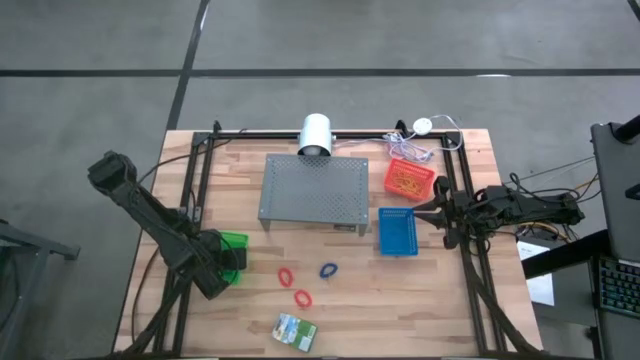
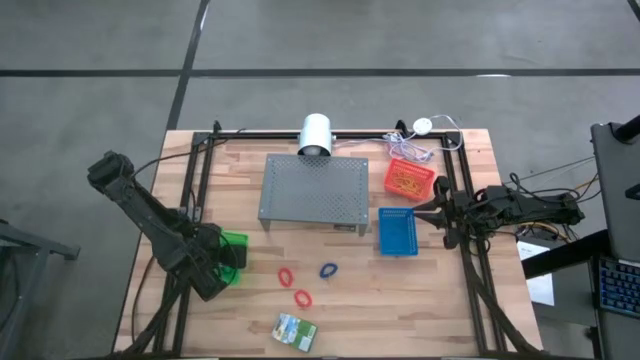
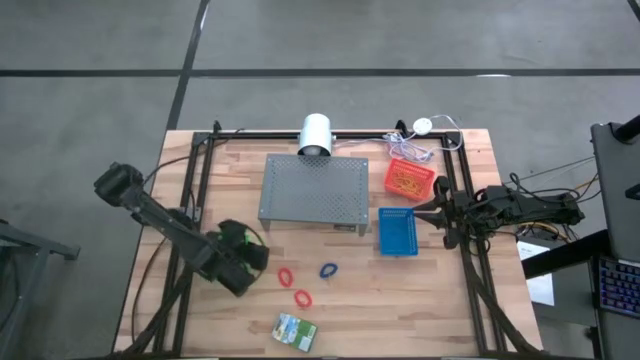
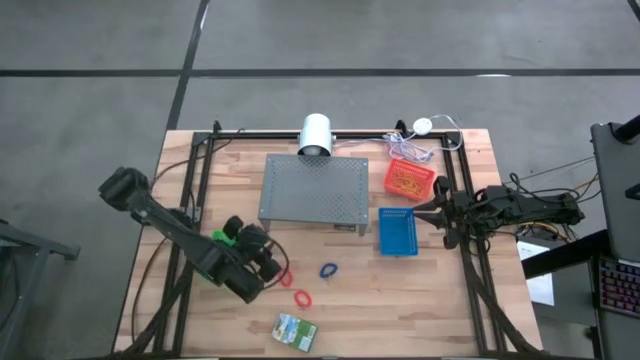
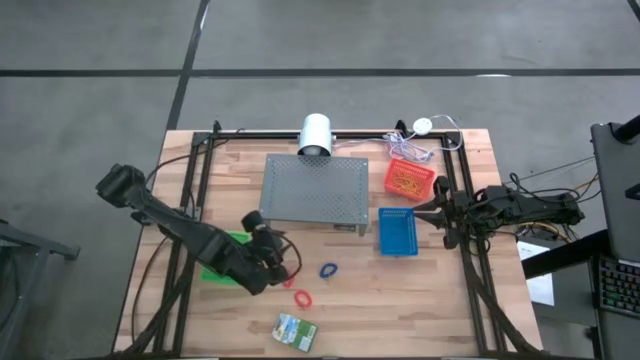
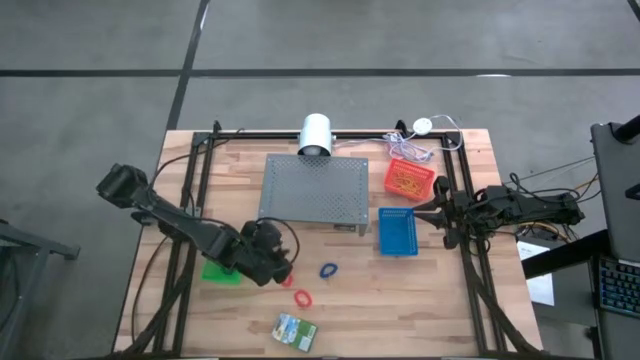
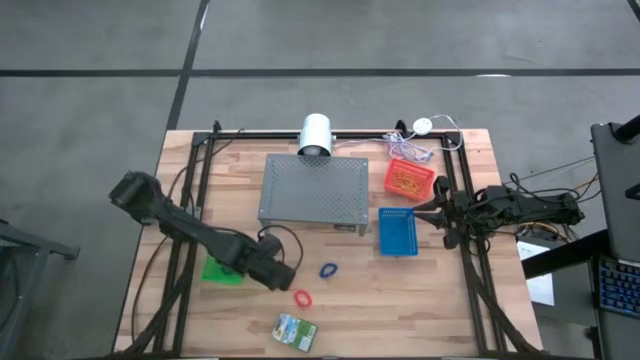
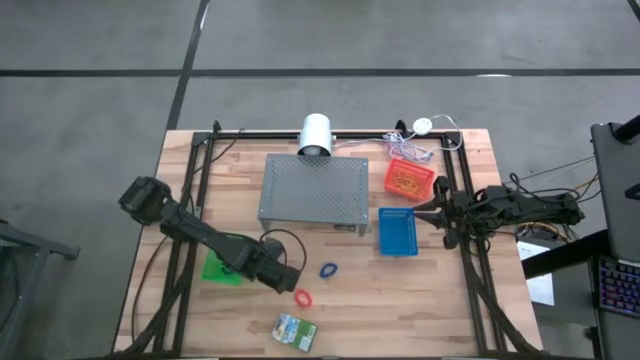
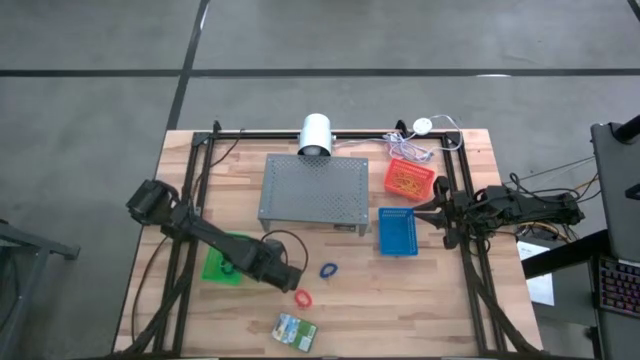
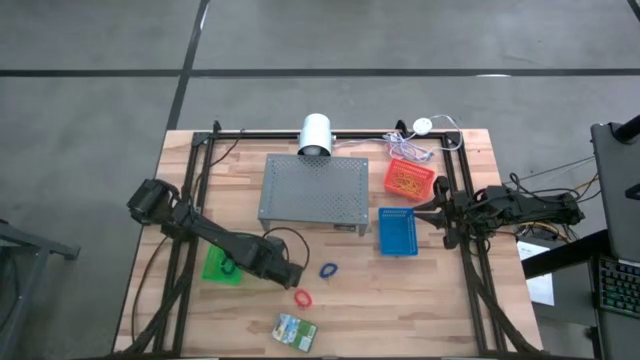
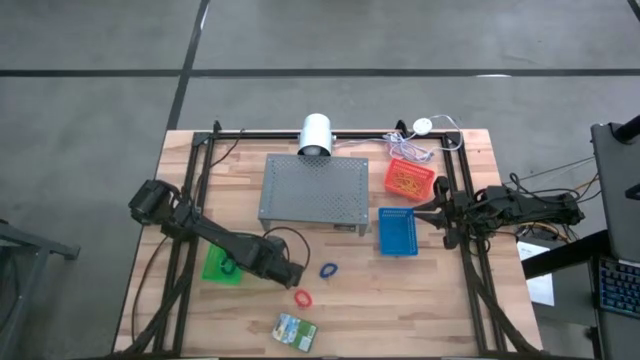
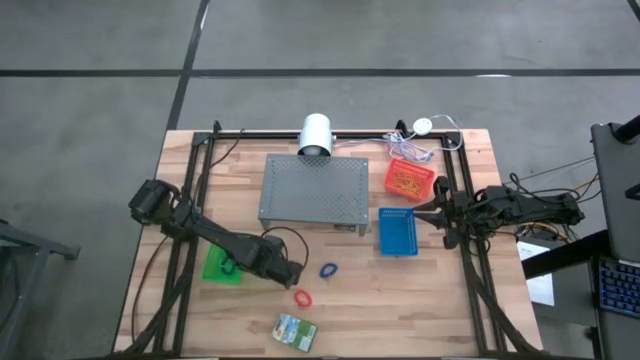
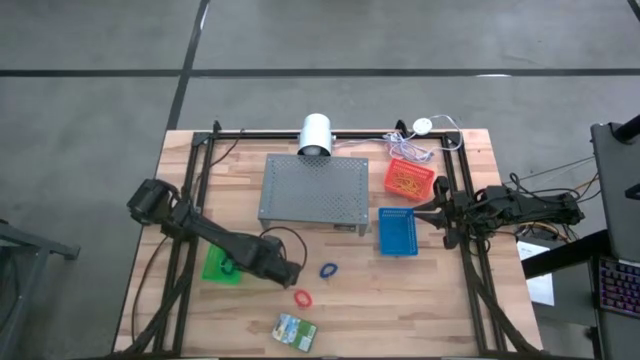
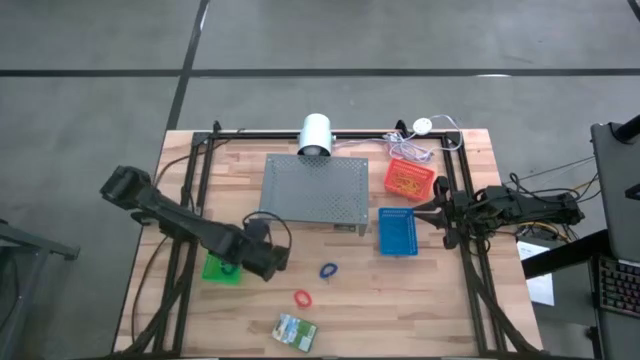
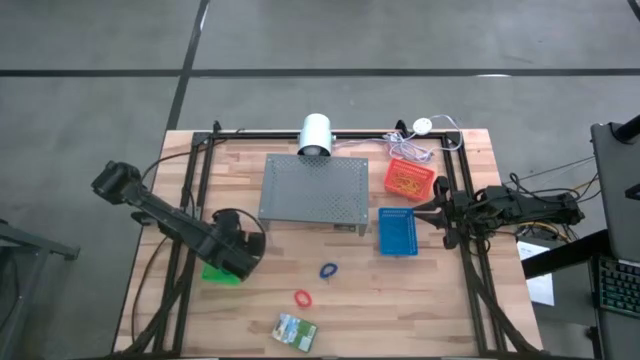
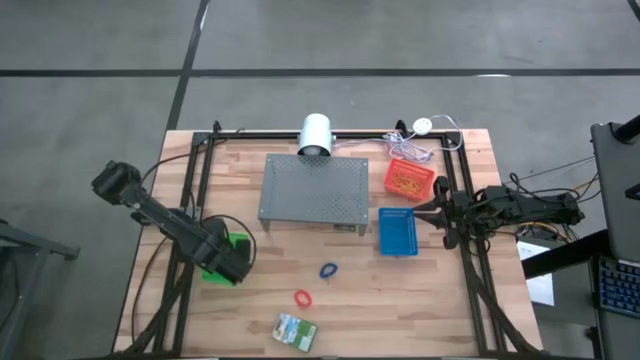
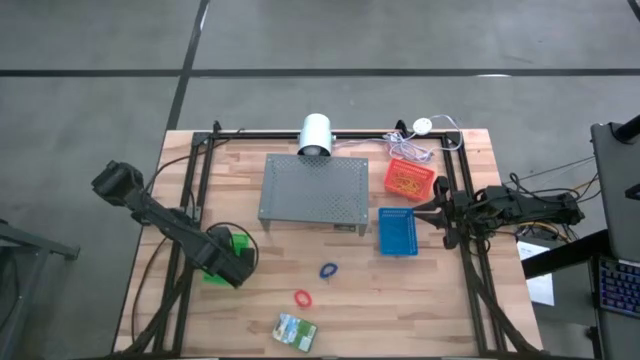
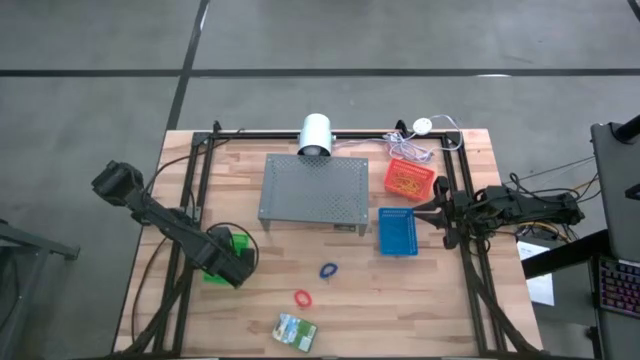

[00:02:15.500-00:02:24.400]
Task: Pick & Place Office Desk Supplies
Put the top orange spring keychain into the green bin

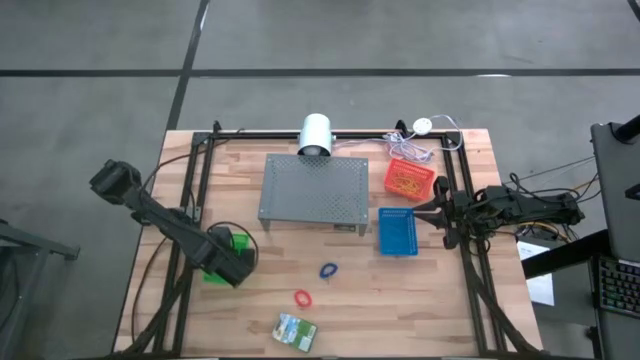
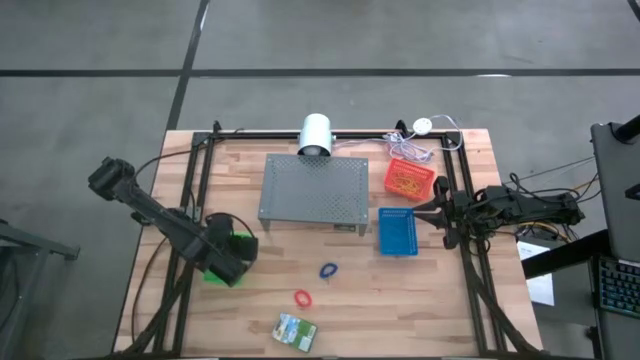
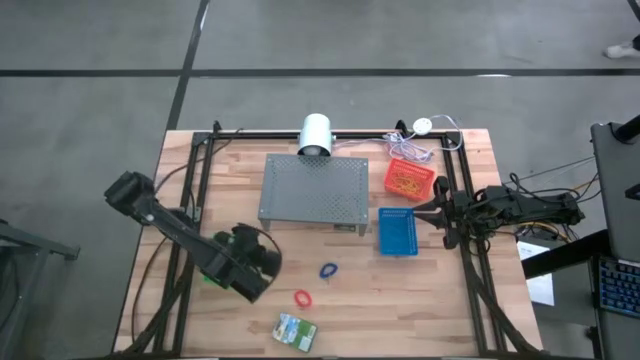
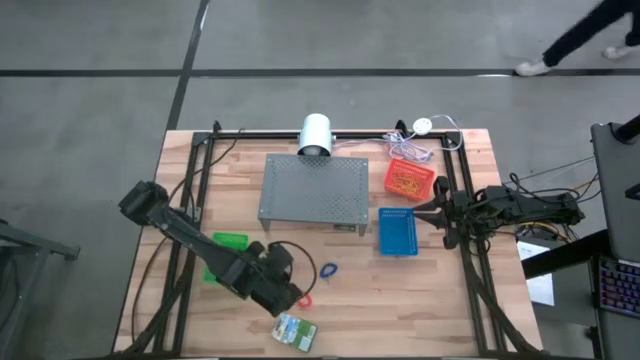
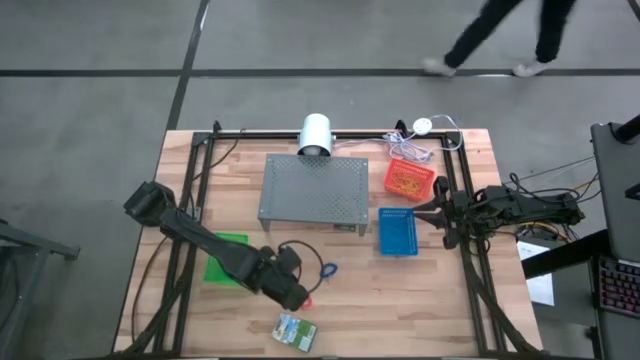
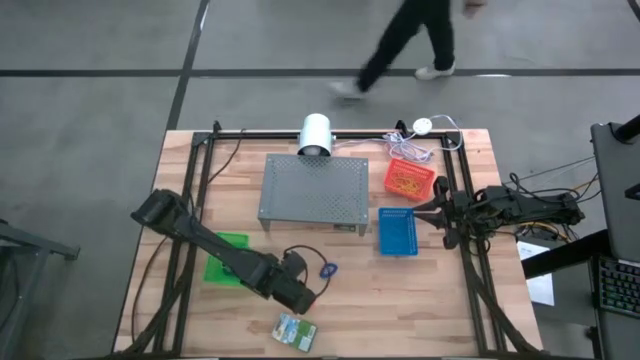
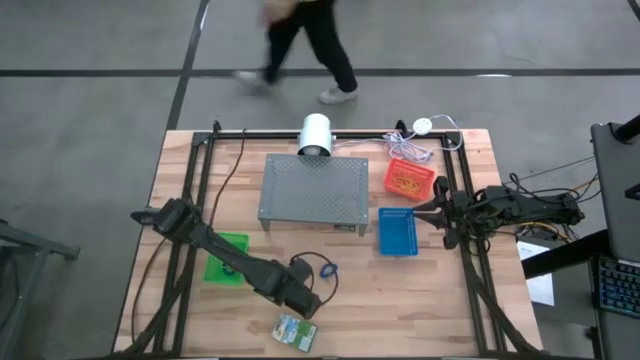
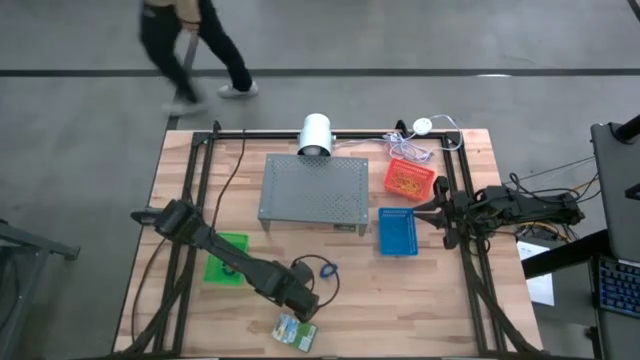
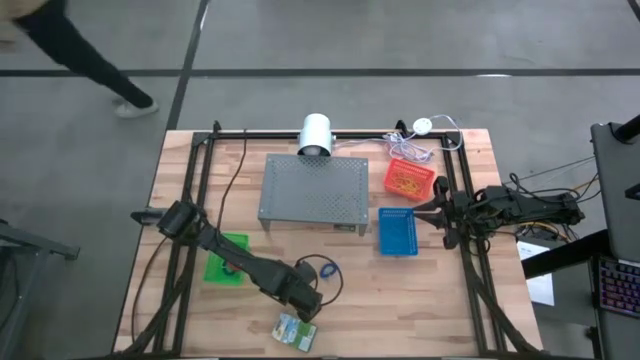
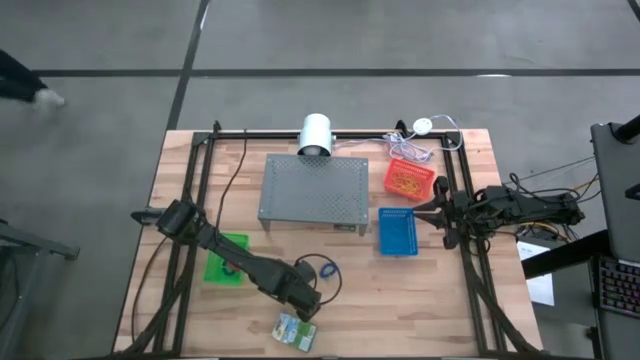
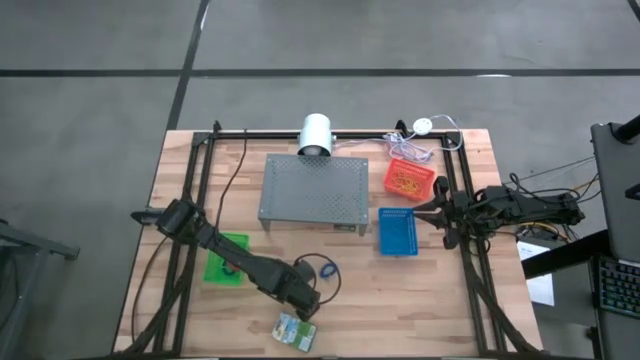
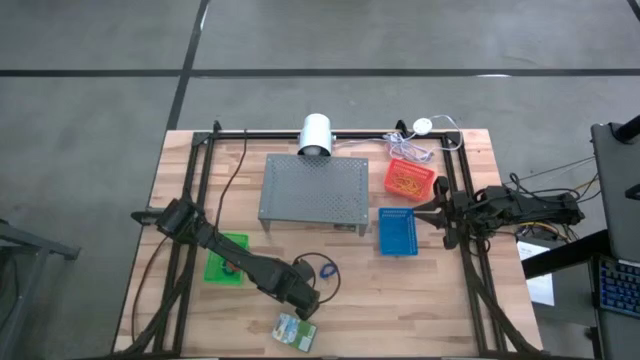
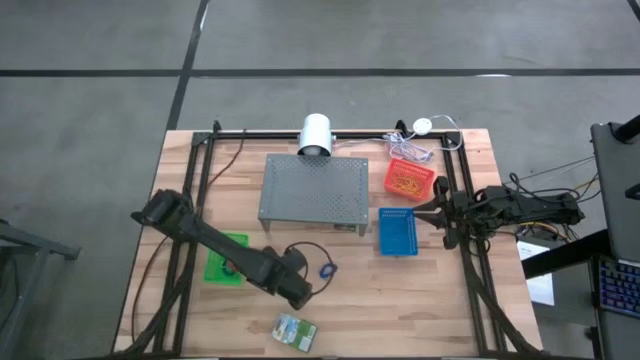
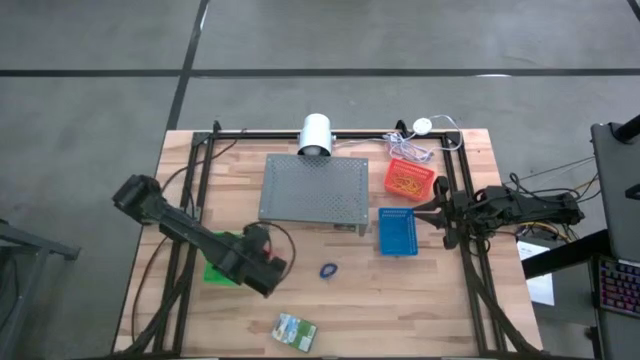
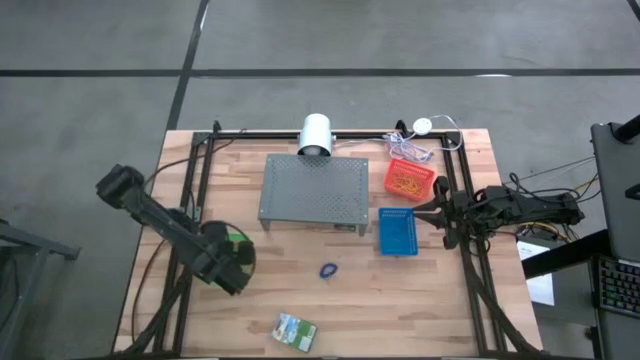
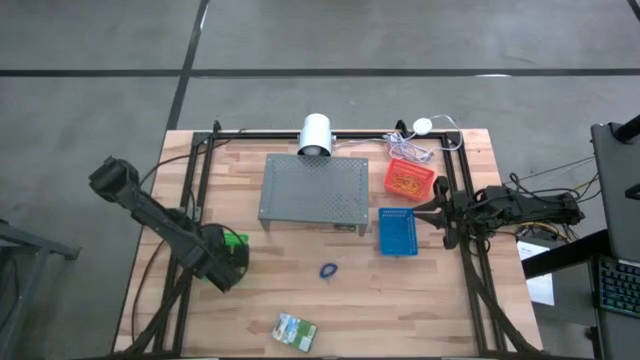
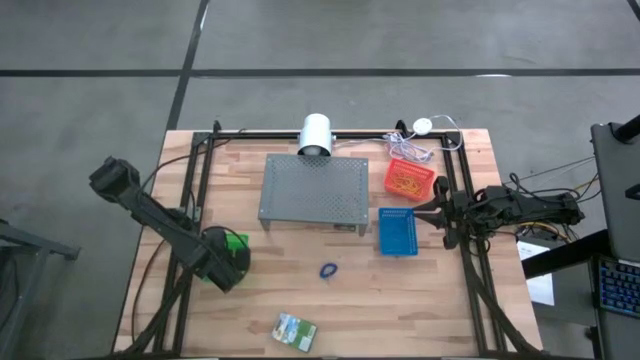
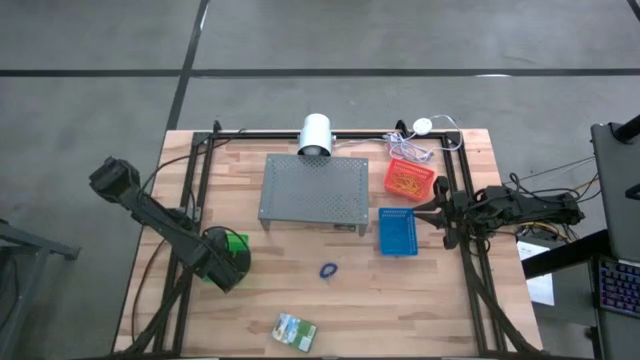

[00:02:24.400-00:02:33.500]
Put the orange spring keychain into the green bin

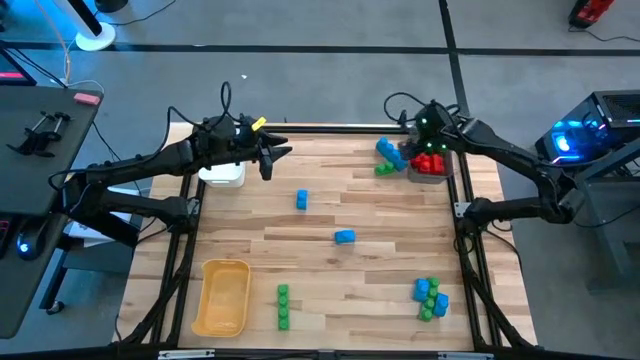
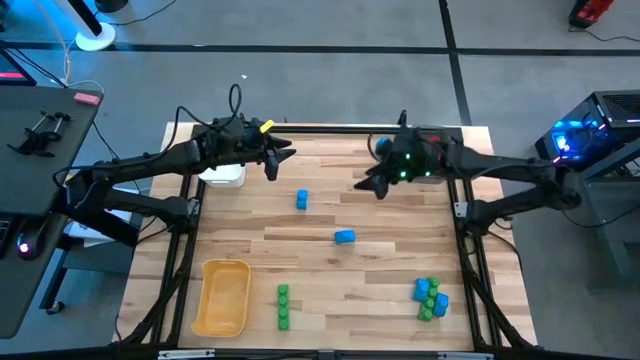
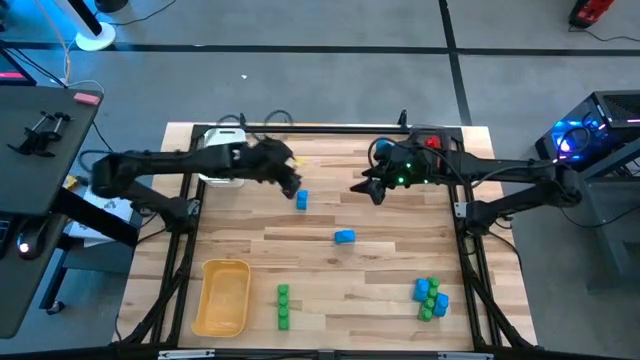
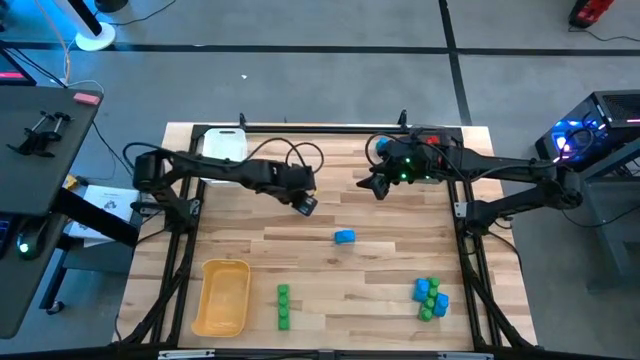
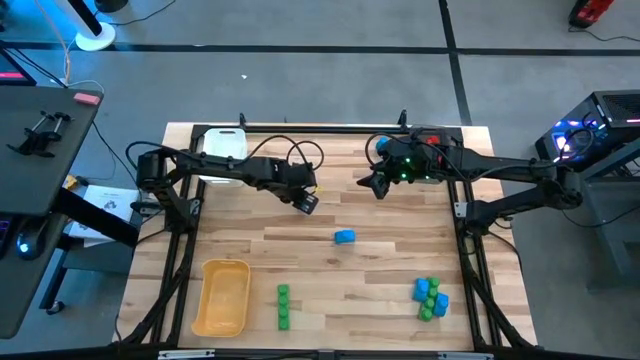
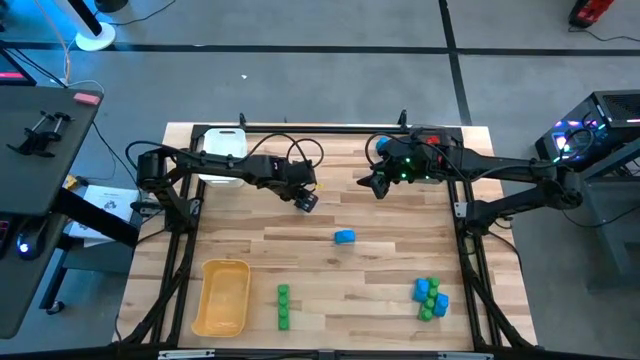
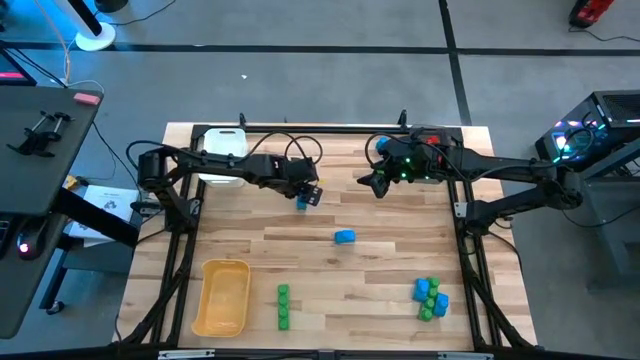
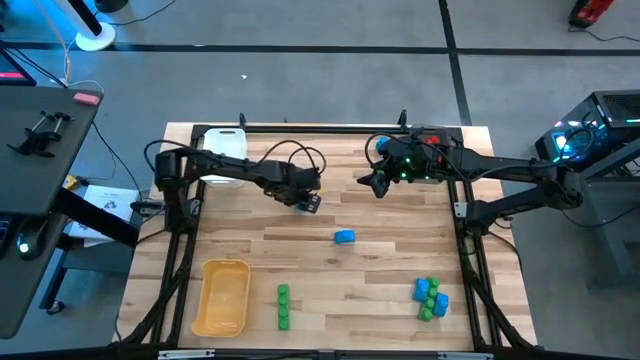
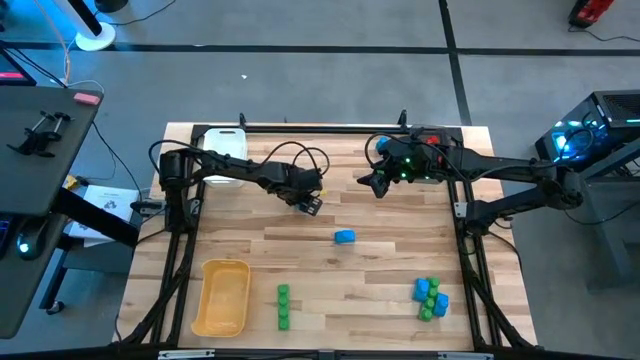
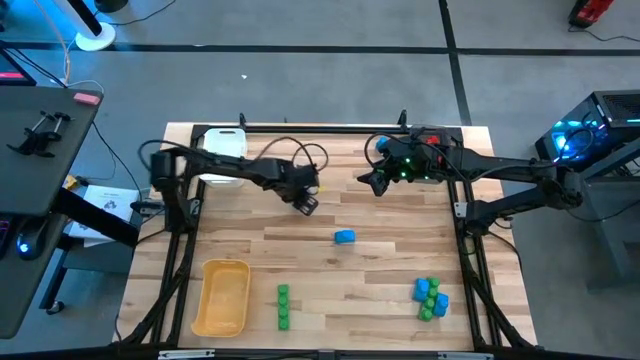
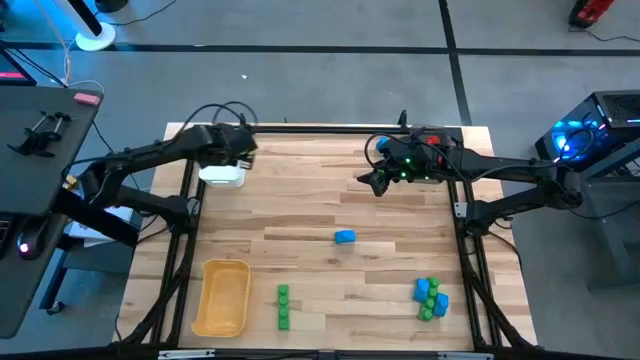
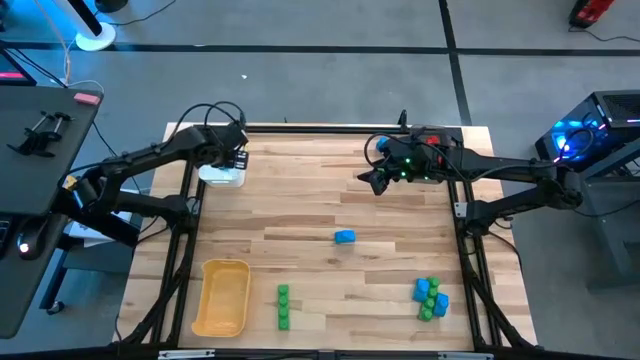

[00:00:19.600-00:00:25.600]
Task: Sort blocks
Put the blue game piece into the white bin
